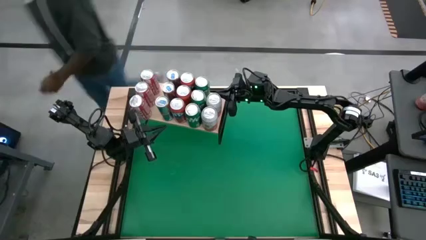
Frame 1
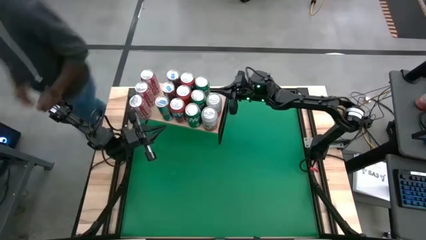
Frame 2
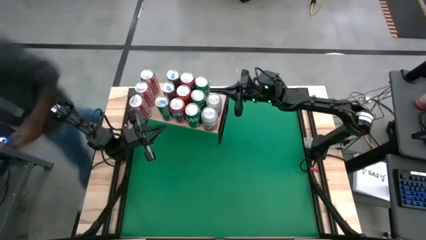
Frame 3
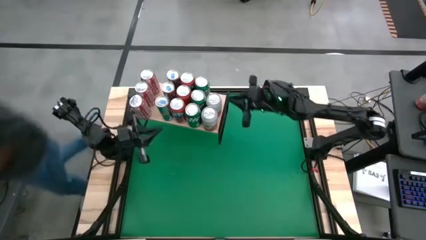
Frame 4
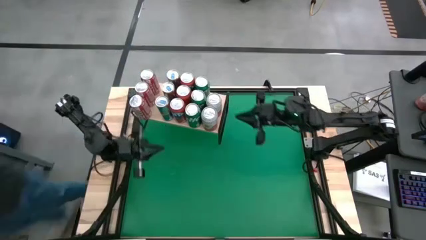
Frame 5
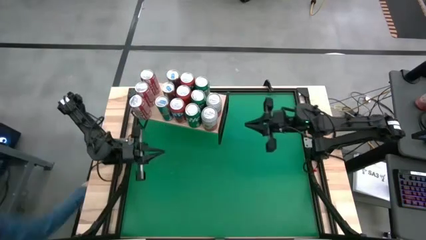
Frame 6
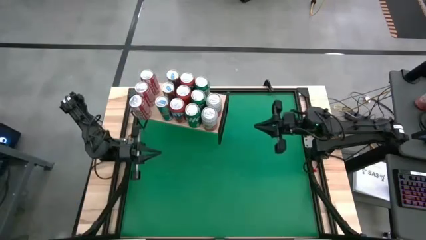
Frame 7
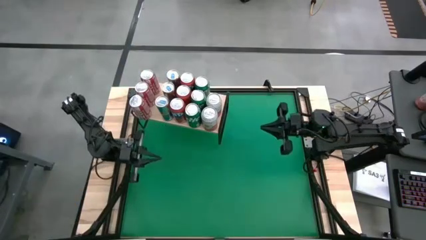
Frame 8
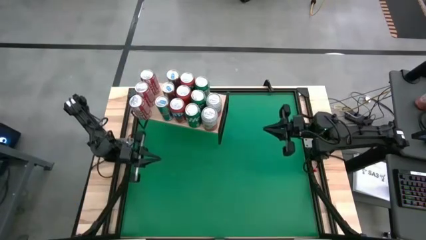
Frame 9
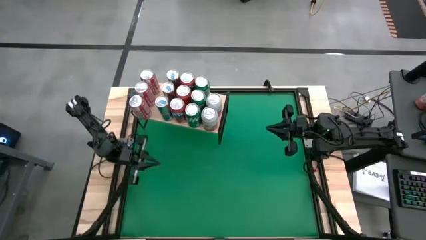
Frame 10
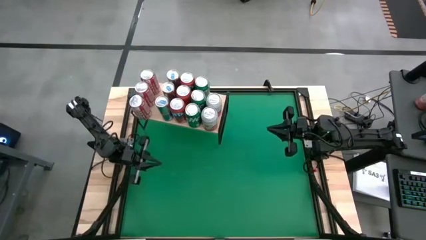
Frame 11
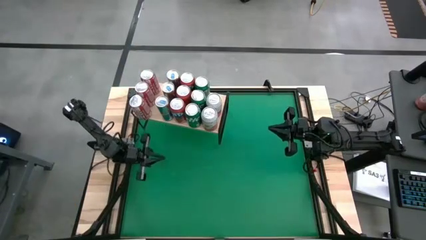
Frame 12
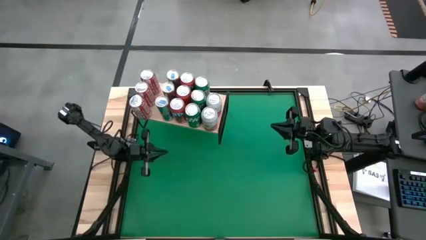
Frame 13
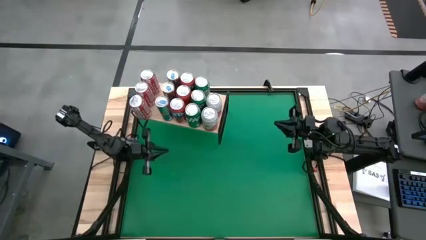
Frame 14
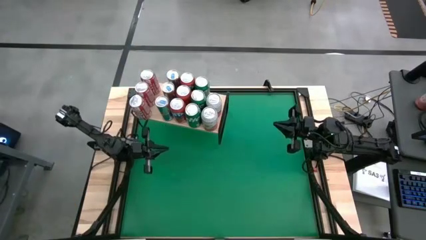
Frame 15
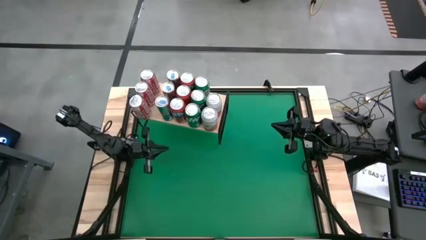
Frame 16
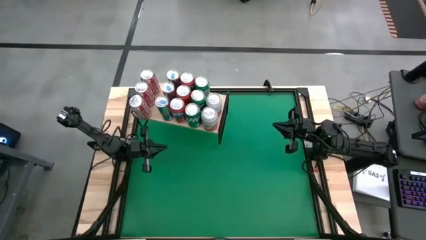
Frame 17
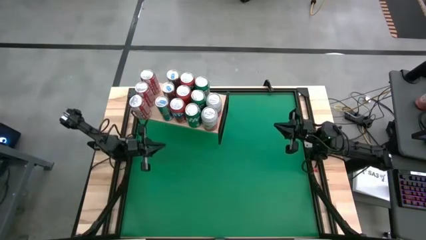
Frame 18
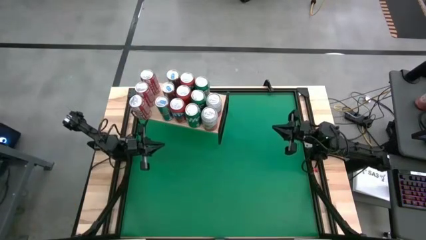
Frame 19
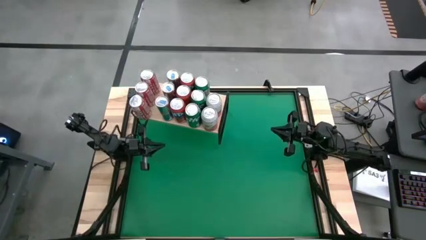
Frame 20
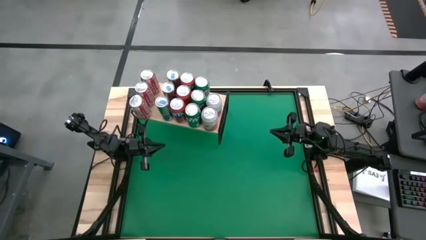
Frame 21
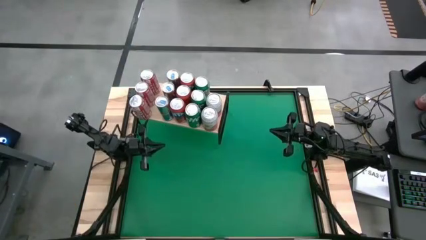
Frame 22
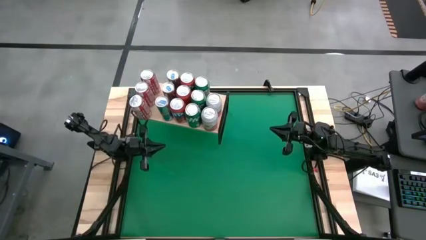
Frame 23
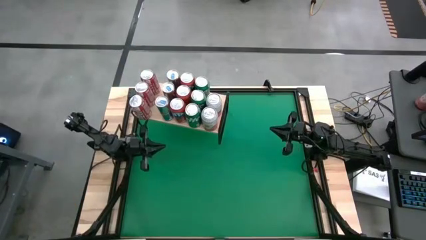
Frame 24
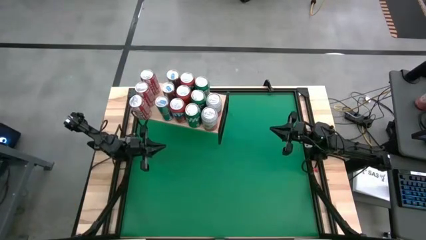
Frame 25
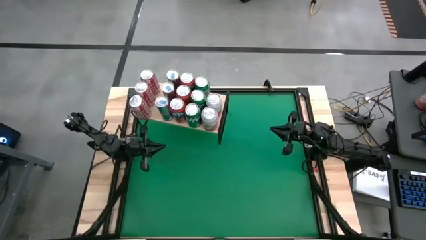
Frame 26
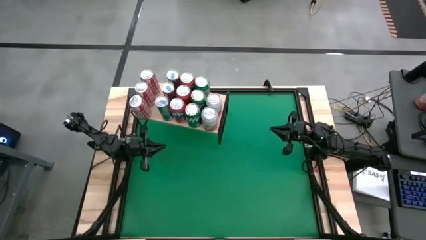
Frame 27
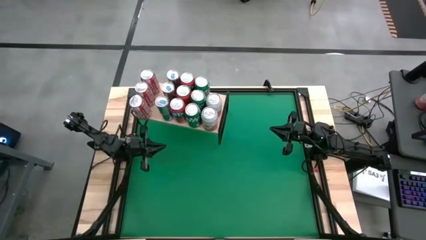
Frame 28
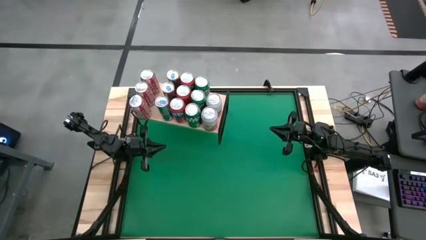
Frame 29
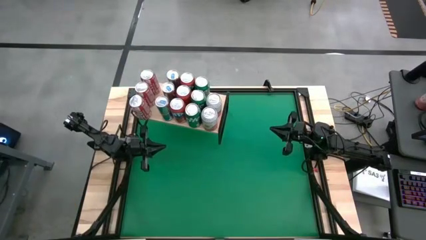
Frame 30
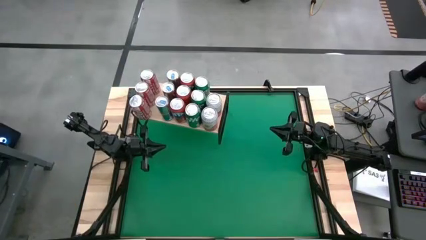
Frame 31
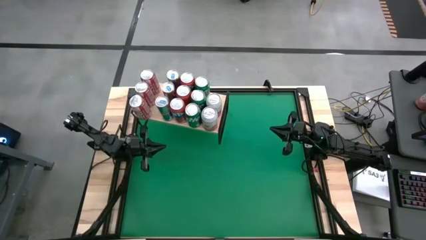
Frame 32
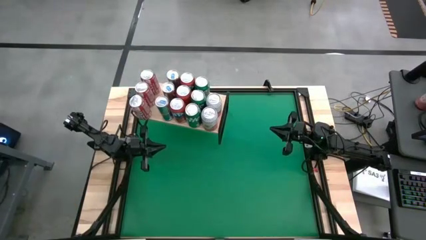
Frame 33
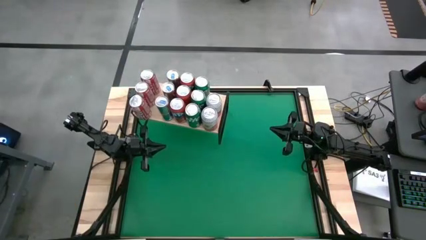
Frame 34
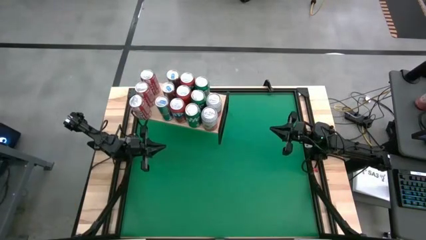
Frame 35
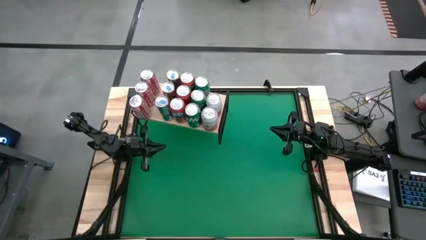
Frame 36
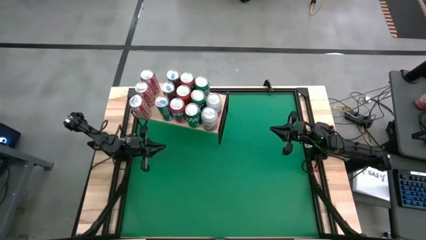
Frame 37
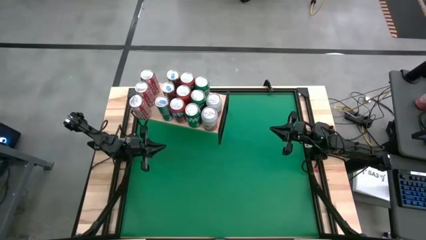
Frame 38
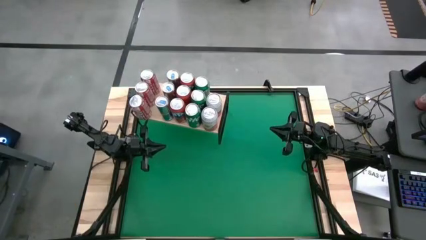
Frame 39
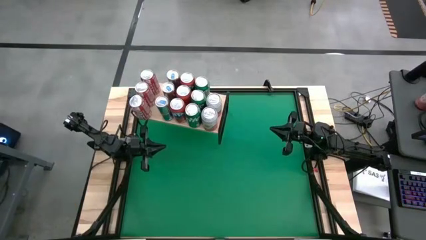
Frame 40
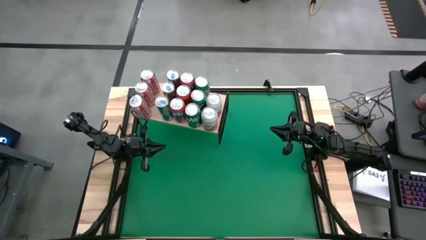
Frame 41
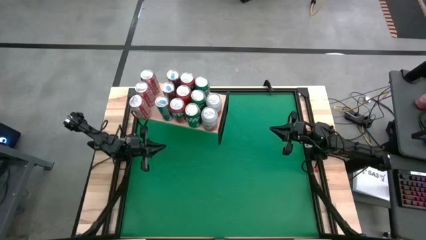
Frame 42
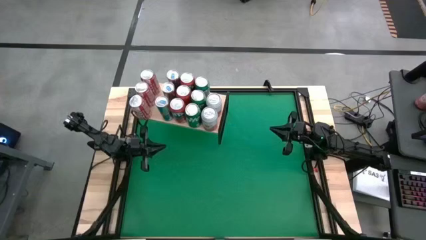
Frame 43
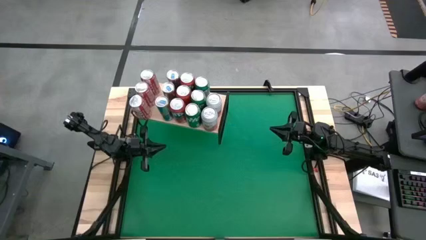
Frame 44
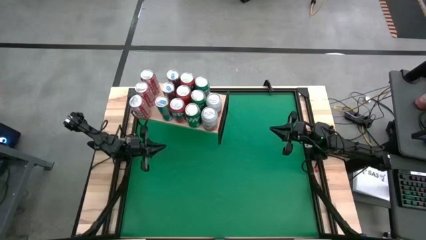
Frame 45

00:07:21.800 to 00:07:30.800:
Task: Place canned beverage on shelf
Return to Home Position

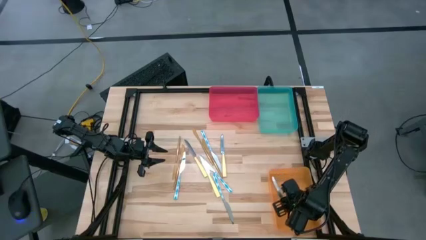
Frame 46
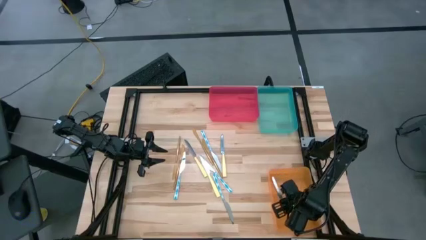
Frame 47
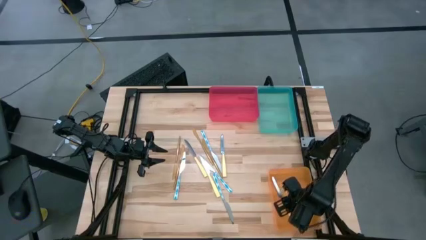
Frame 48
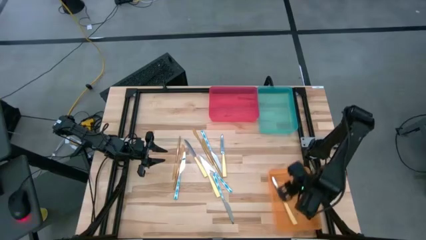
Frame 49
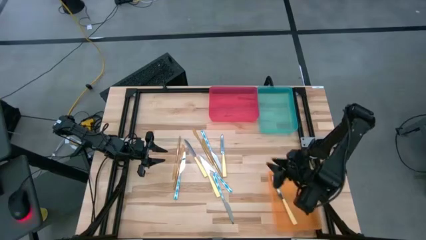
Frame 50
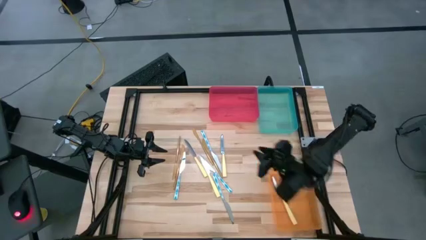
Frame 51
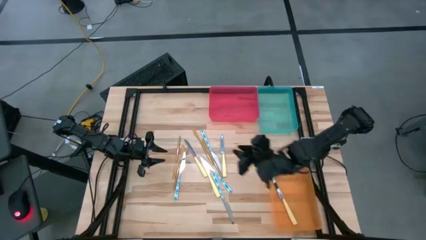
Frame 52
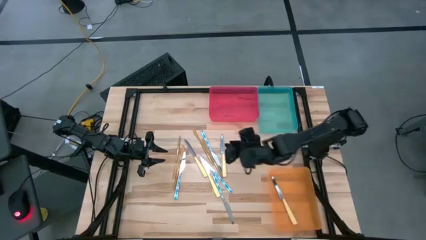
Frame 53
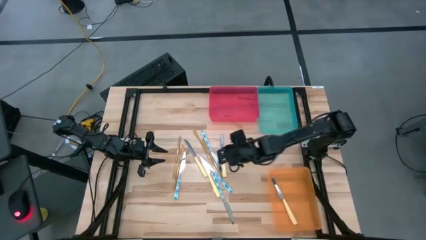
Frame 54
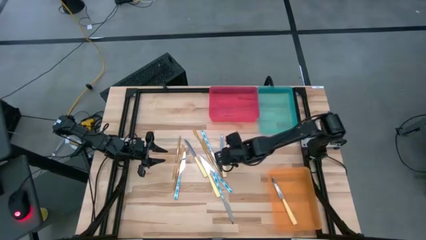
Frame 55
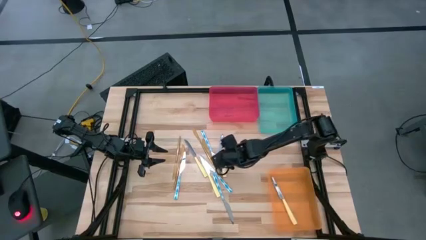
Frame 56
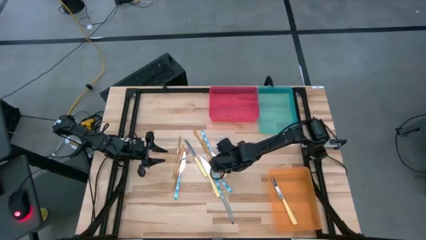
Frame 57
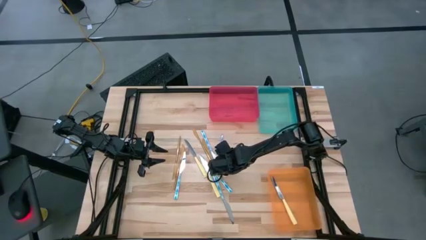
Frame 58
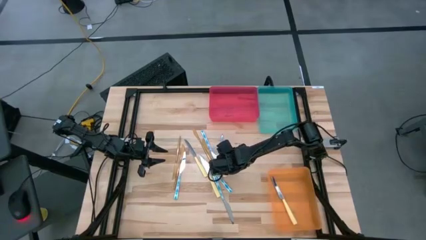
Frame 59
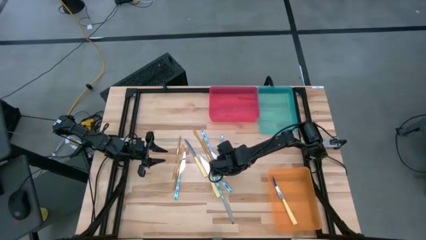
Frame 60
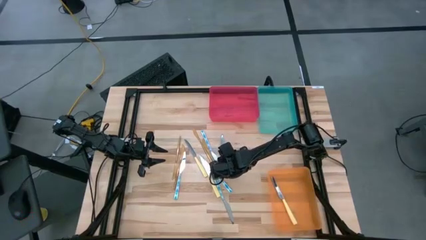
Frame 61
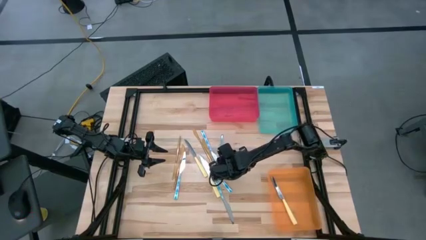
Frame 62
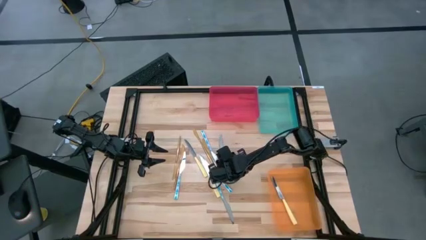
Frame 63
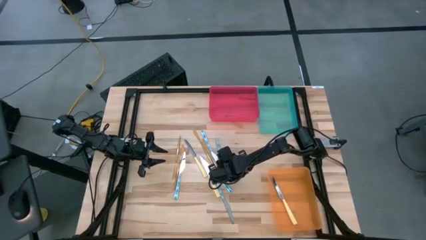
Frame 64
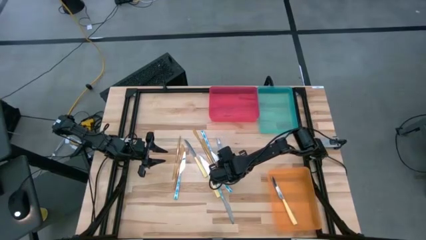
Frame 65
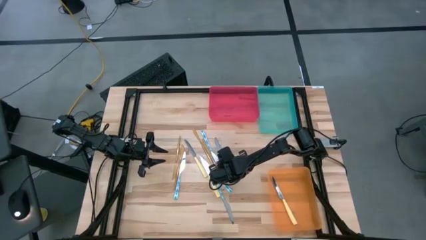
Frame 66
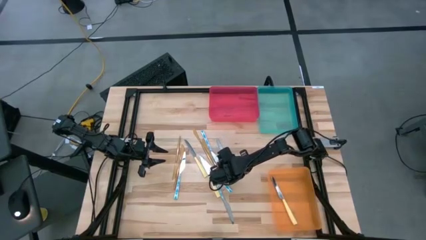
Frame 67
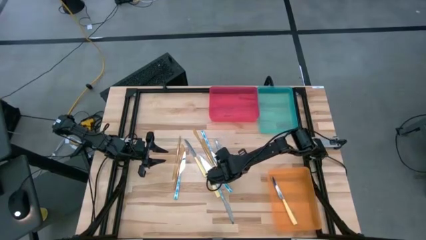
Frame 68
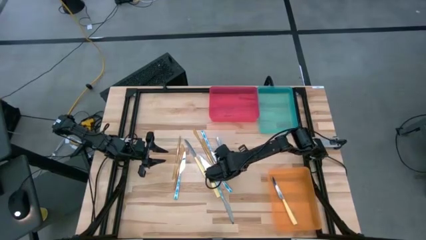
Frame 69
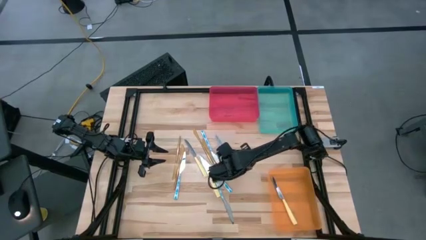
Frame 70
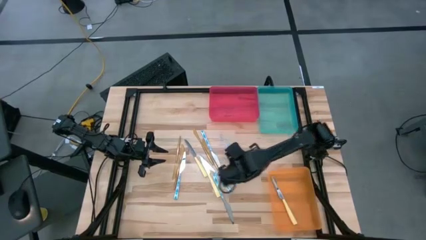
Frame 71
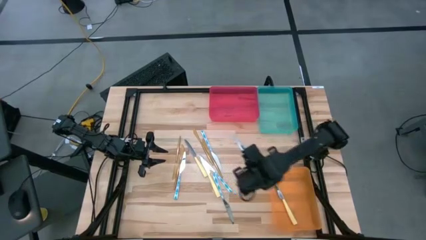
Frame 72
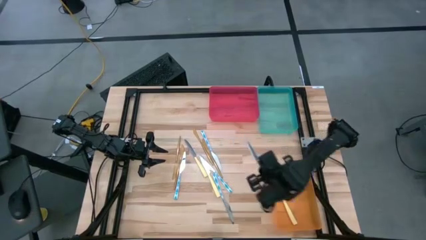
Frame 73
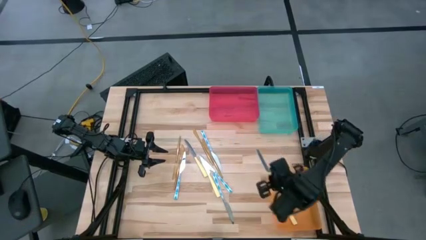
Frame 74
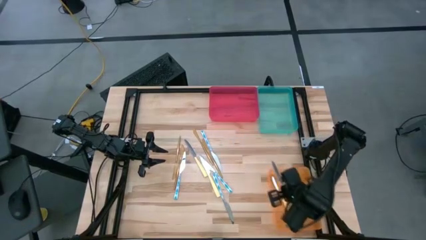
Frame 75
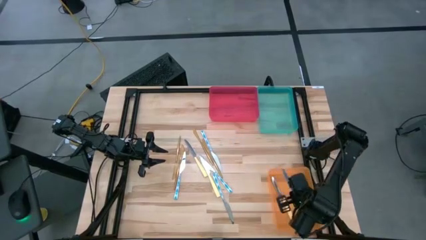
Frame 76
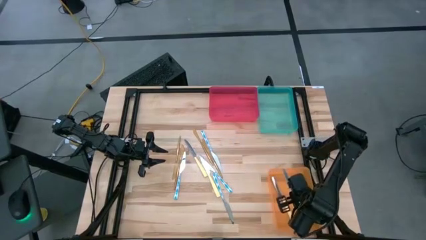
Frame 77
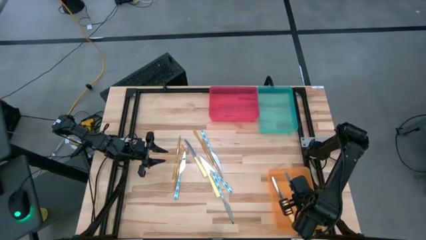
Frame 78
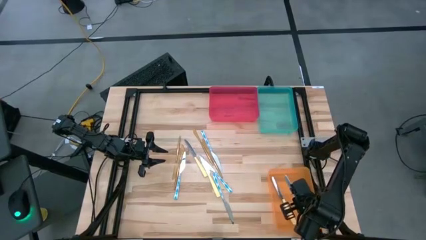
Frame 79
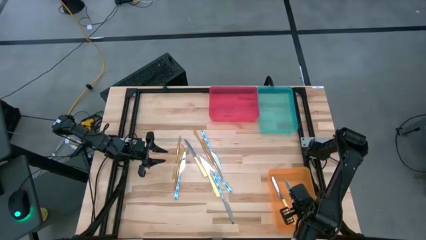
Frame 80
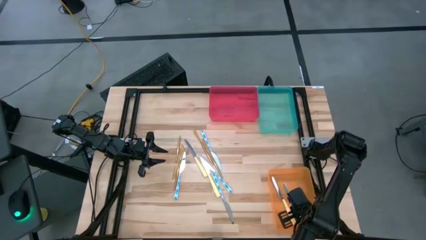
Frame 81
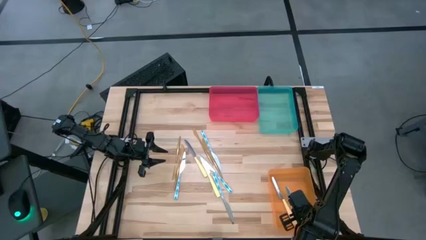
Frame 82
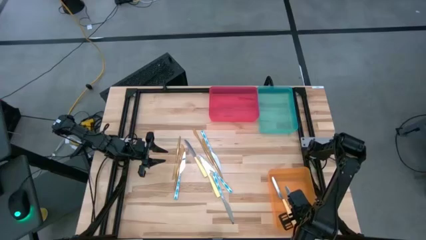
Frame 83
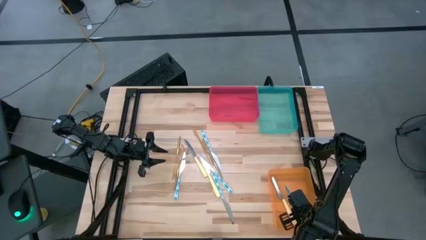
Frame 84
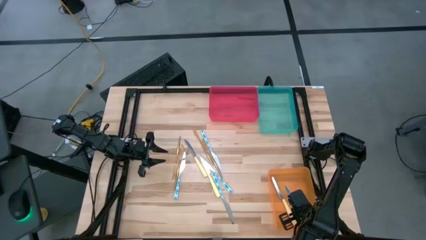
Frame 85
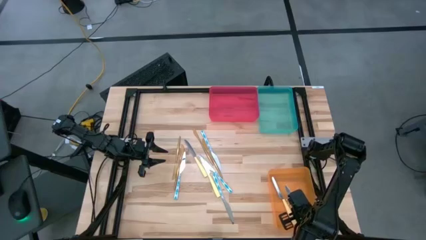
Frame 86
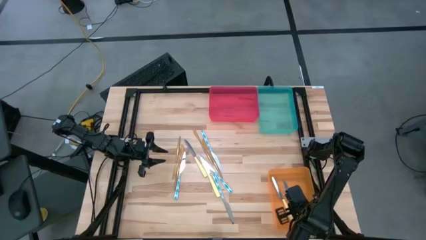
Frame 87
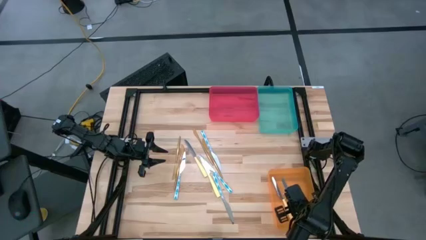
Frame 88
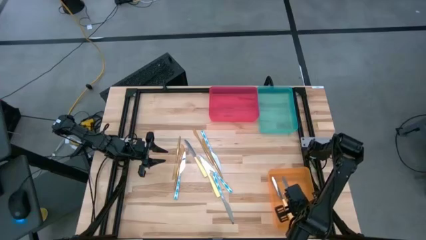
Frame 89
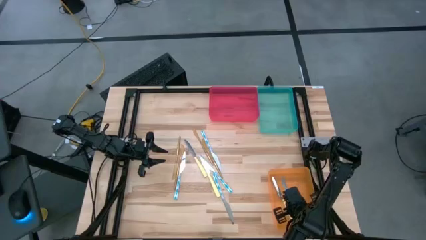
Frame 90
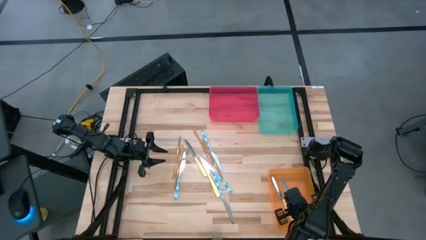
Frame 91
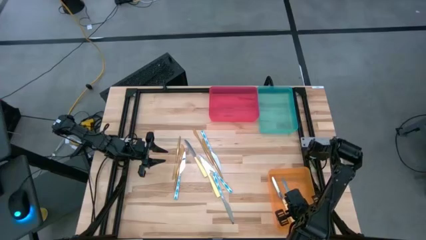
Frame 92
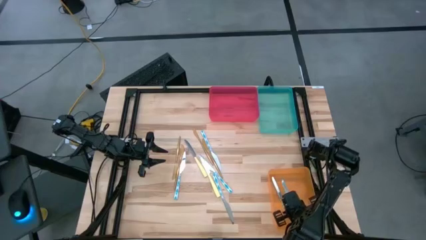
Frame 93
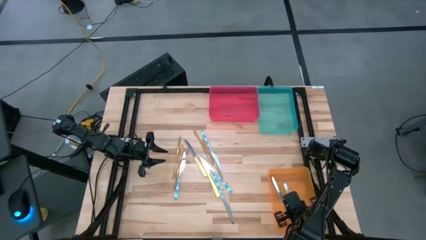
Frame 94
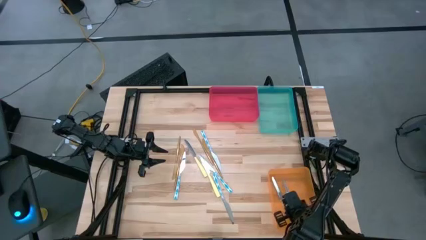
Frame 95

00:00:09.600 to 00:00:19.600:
Task: Sort silverware by color (type)
Put the yellow knife into the orange bin
